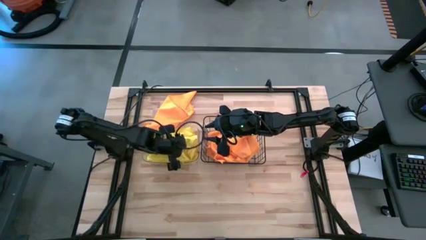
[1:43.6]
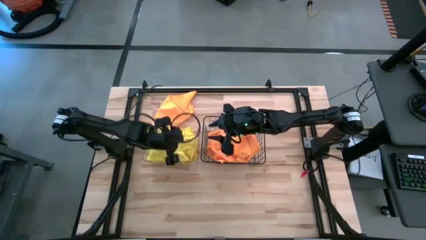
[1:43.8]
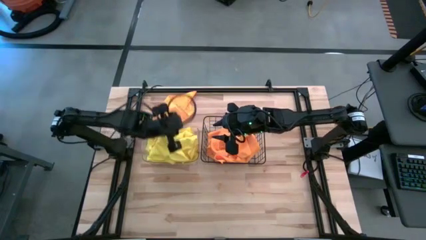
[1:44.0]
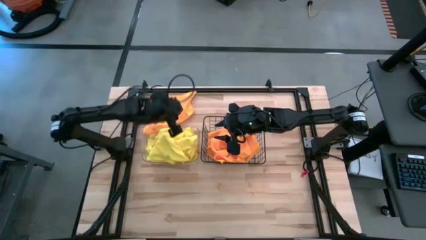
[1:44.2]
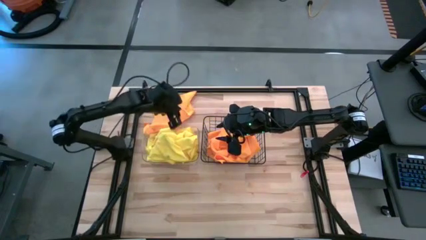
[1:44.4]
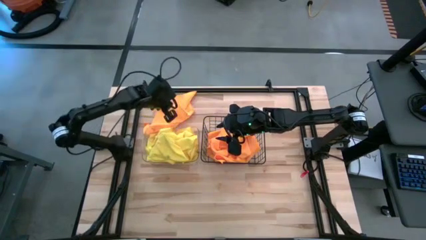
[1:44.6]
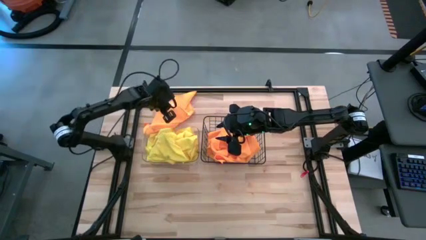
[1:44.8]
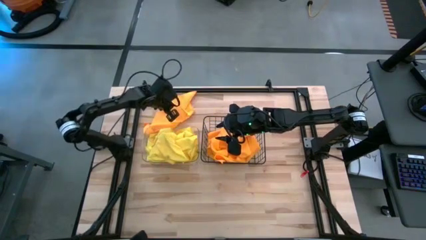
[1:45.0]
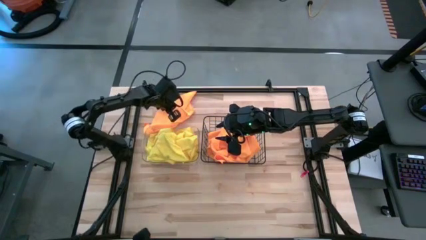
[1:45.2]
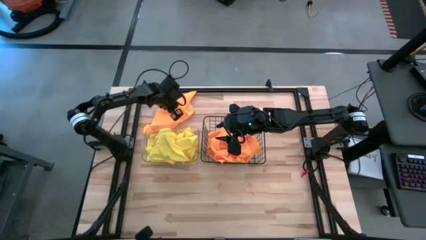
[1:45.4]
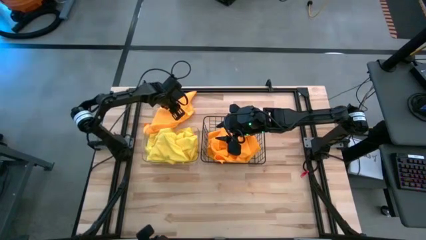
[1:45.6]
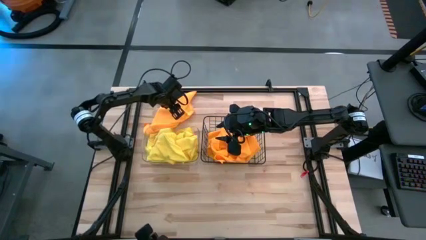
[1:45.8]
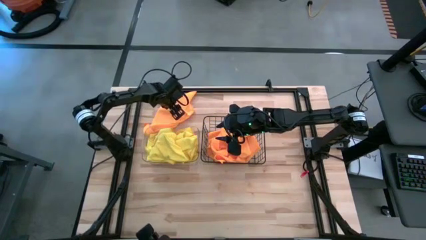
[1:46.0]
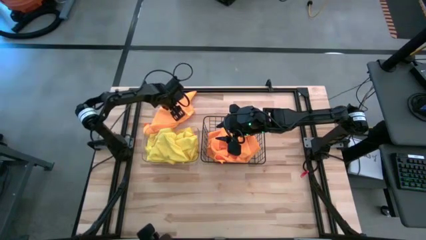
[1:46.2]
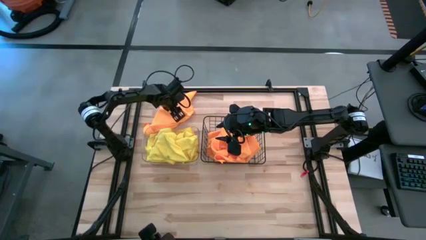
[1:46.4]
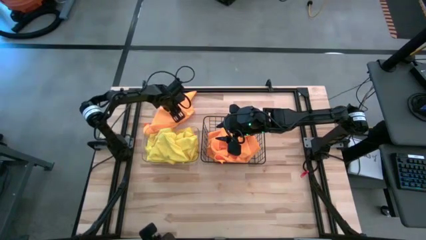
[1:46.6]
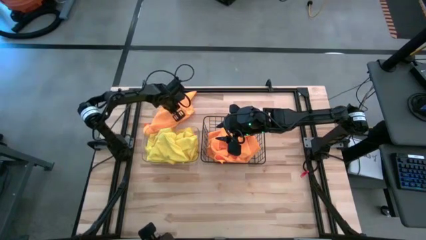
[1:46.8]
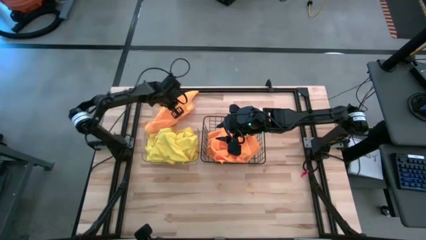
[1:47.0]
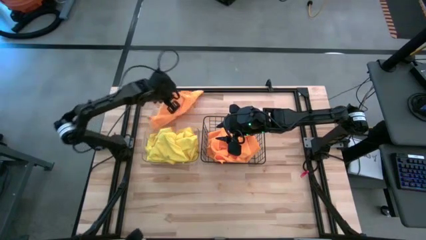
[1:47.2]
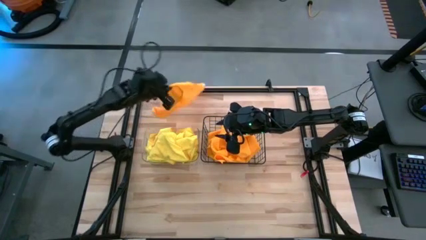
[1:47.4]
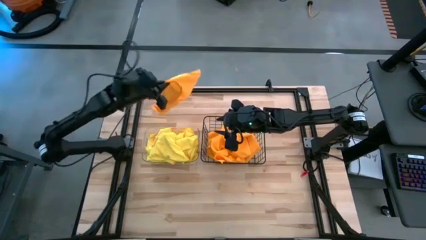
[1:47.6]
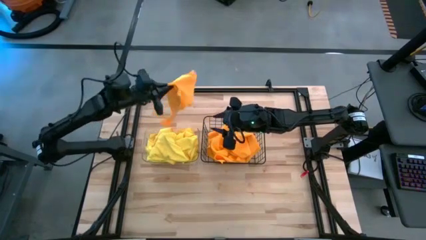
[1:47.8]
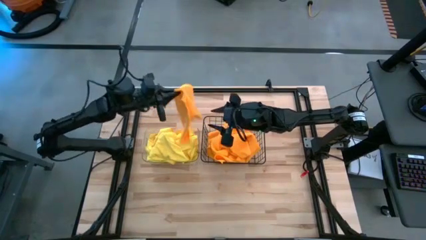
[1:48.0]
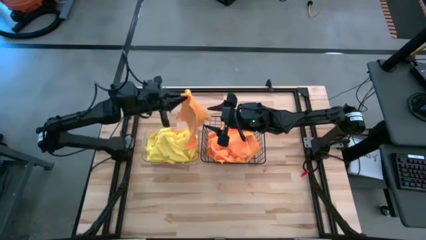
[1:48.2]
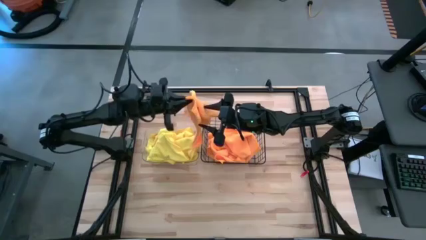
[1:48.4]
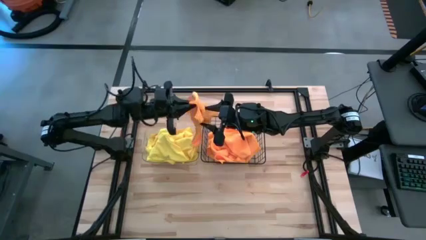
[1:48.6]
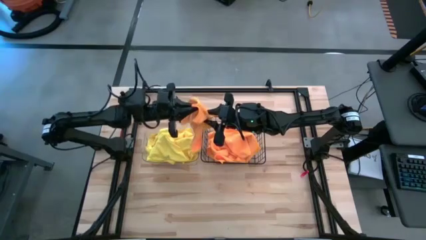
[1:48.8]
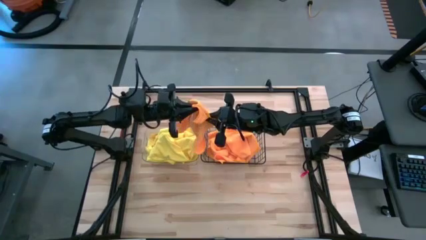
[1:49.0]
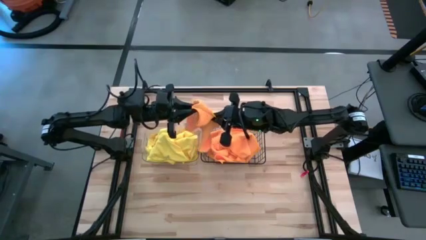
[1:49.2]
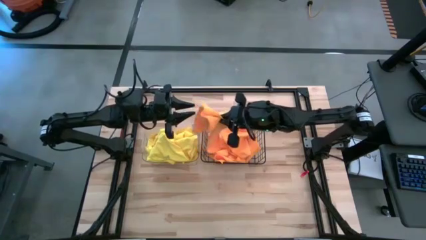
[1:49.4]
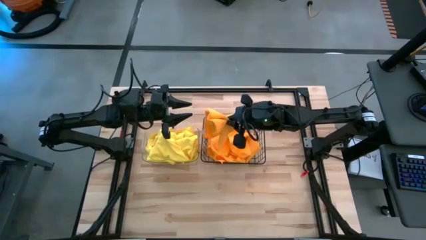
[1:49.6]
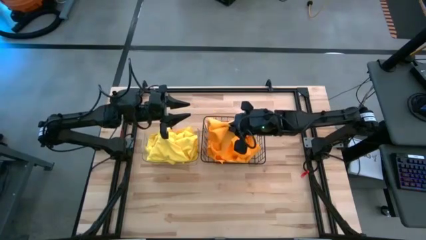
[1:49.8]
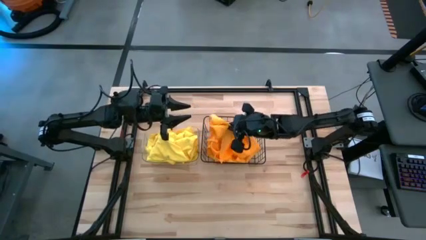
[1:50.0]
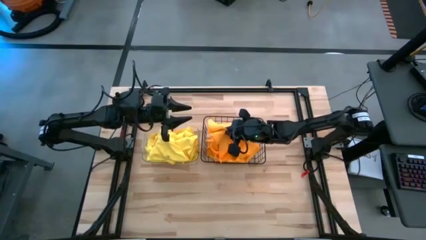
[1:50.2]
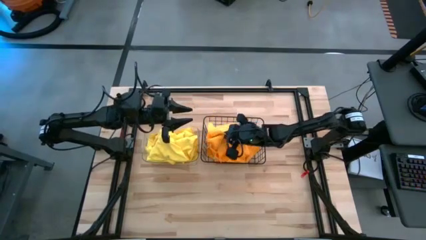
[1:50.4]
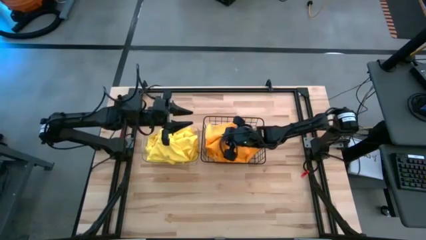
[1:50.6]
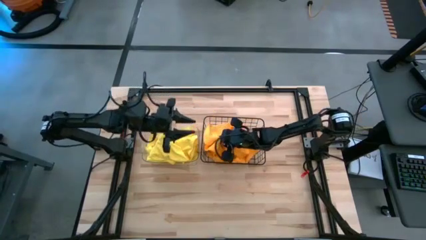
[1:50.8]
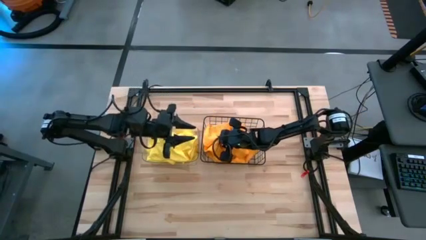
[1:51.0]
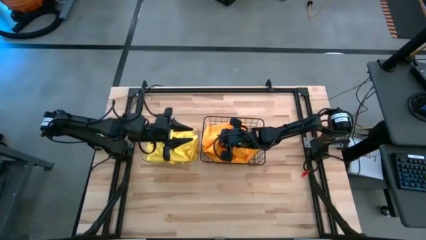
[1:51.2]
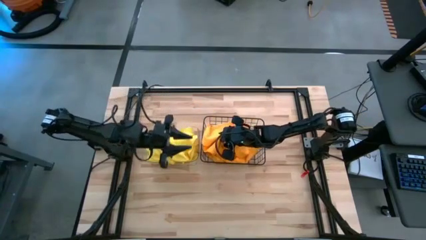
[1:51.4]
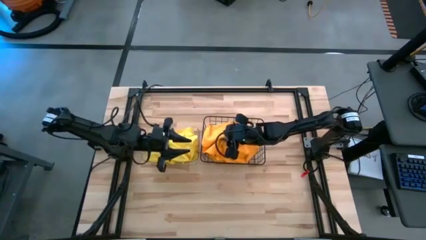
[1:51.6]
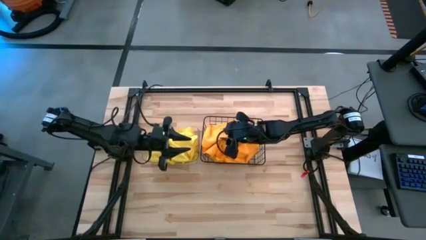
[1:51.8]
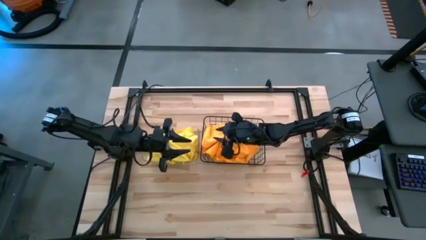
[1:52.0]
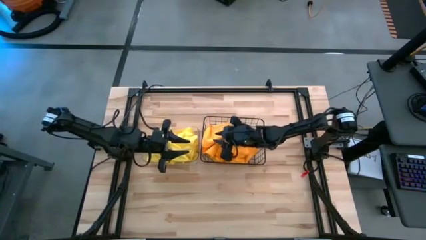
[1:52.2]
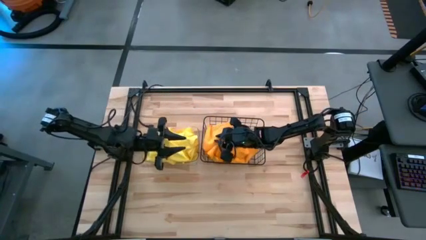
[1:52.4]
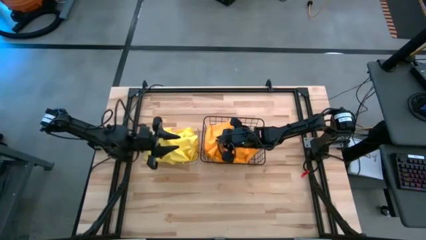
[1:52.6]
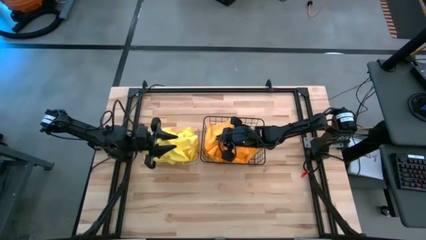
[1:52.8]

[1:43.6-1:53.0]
Task: Sort microfiber towel by color & place in baskets
Put the orange towel into the black wire basket

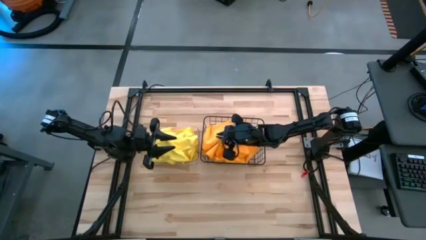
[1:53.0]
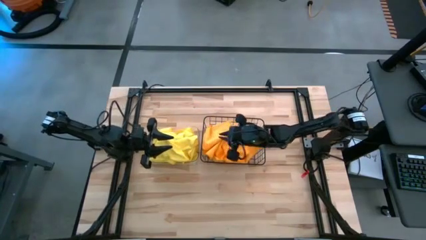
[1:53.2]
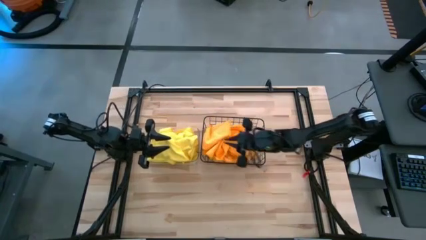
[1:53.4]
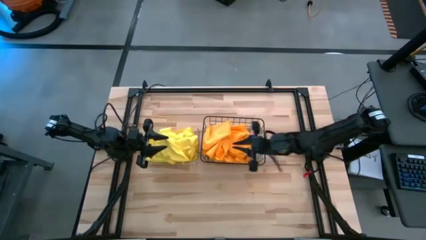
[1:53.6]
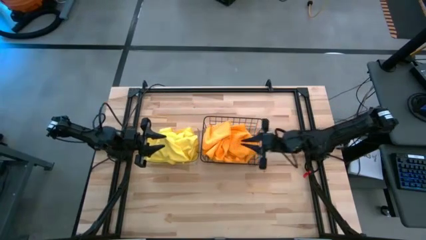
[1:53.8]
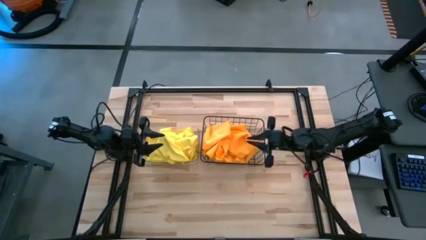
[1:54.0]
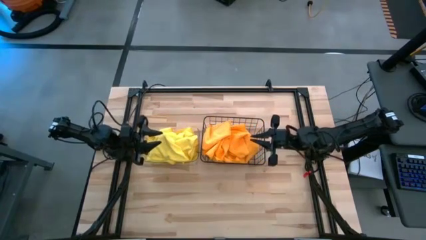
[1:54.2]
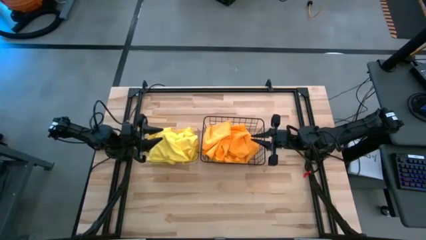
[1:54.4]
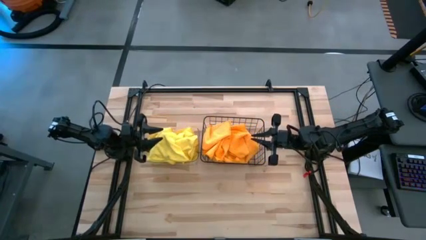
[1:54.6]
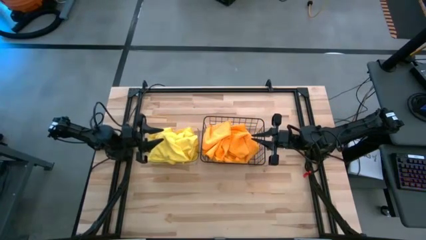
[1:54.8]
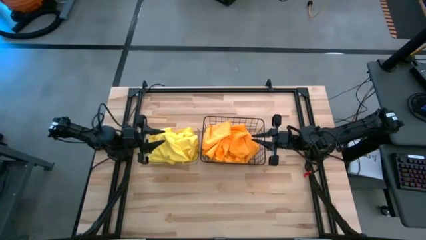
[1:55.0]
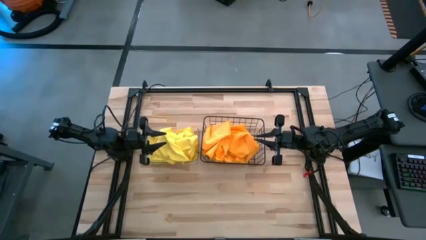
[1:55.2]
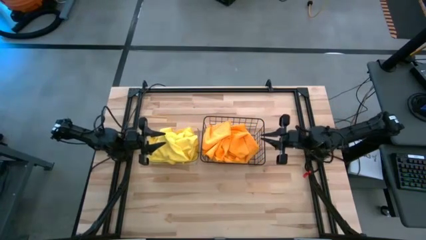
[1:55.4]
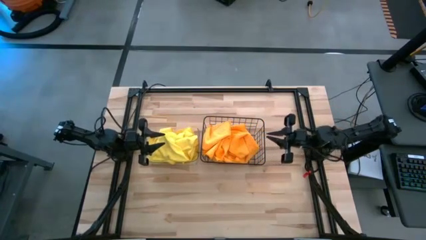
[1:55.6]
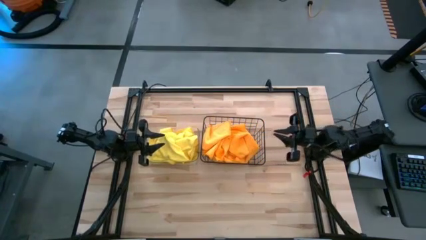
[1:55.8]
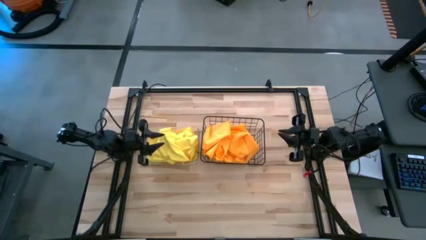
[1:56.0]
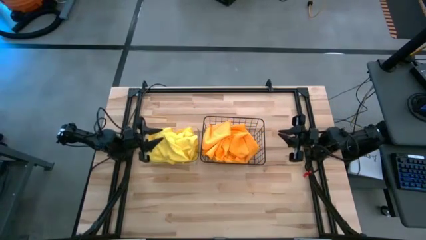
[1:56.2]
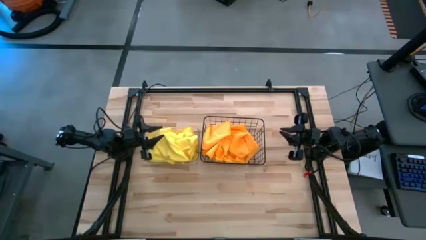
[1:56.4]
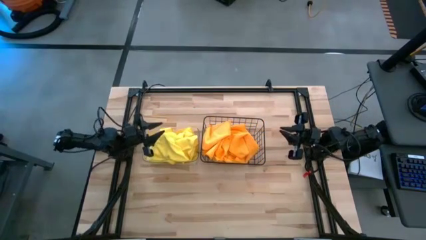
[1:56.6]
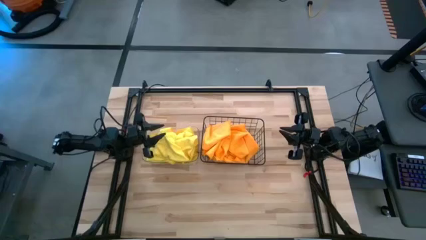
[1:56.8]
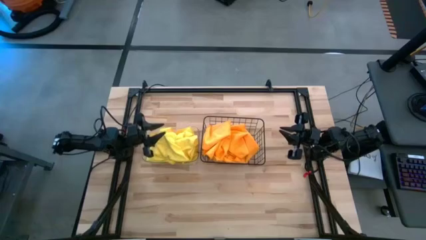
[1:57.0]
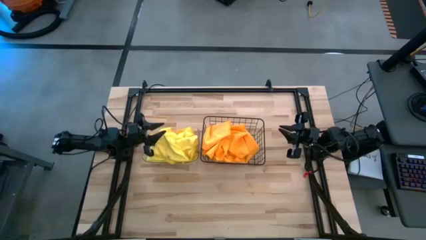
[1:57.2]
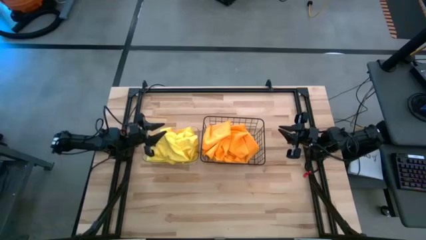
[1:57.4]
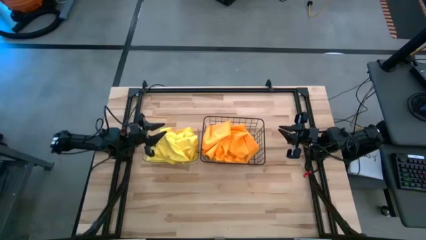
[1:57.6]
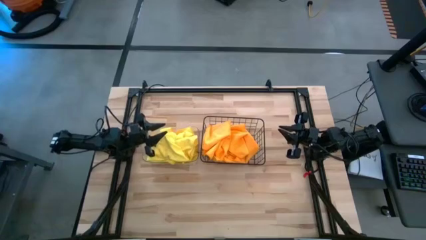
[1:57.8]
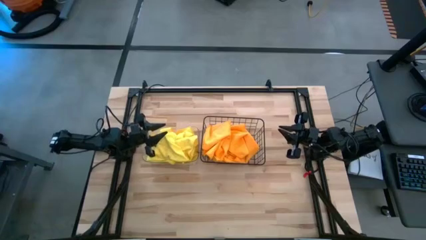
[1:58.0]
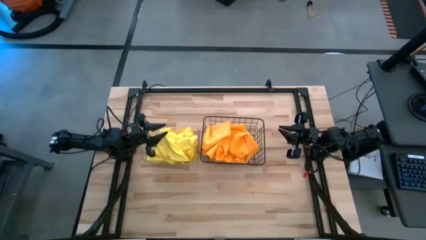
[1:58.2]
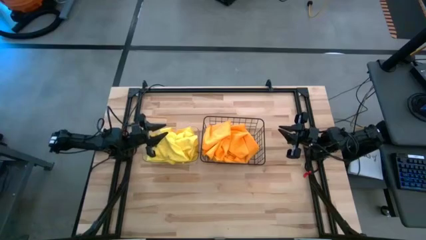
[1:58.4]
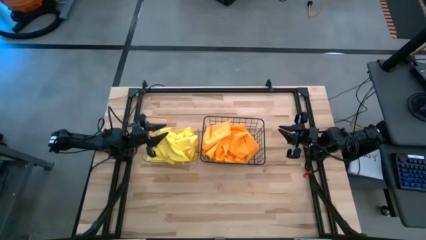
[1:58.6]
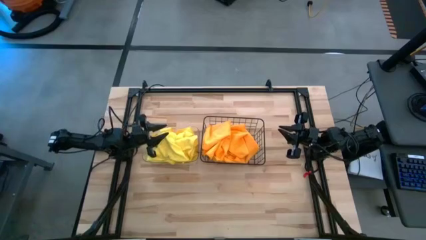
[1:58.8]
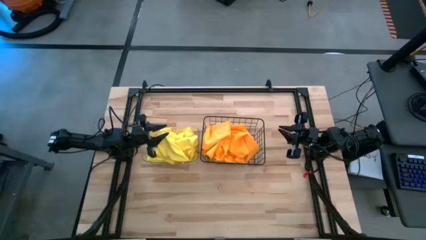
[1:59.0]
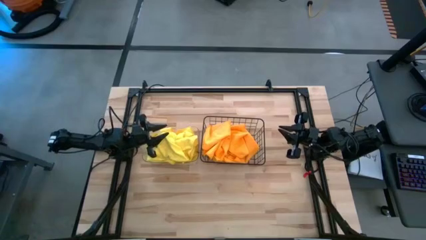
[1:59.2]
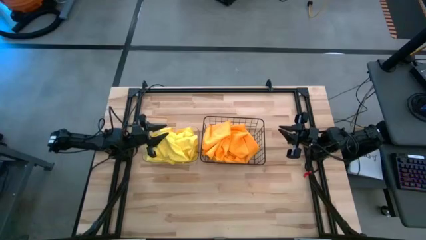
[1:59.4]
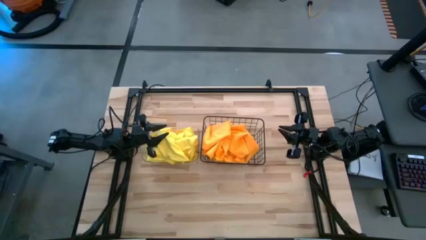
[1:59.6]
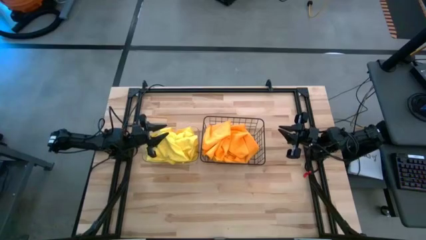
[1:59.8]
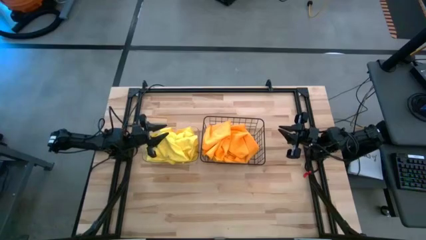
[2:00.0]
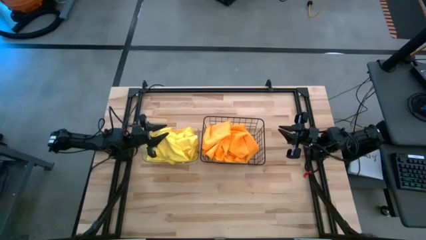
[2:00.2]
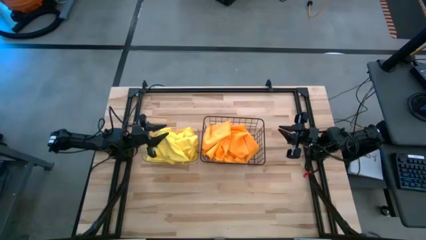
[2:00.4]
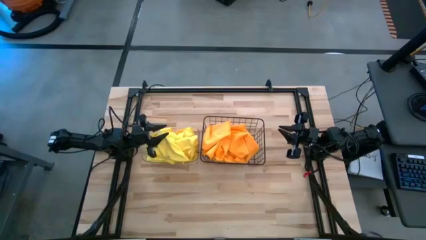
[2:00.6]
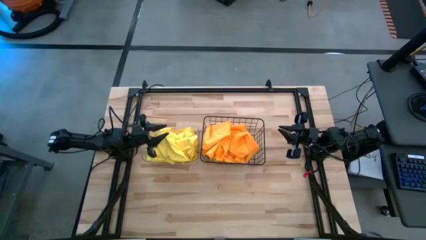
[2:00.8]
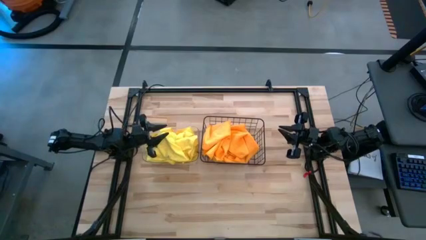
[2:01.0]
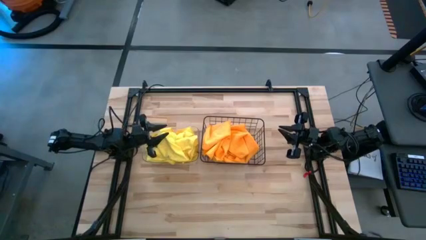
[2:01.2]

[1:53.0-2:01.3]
Return to Home Position
